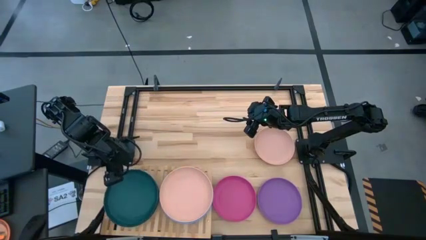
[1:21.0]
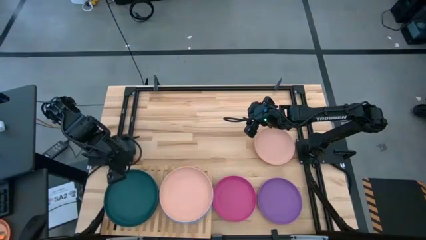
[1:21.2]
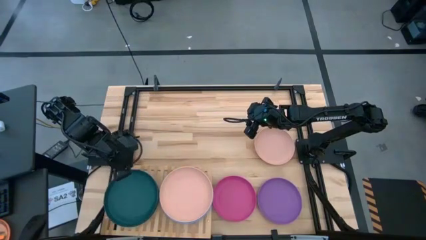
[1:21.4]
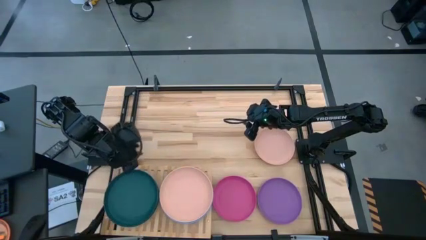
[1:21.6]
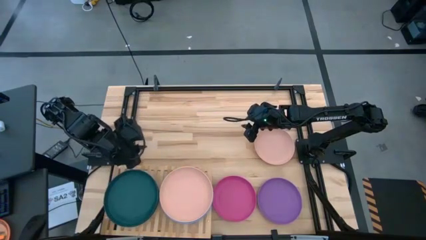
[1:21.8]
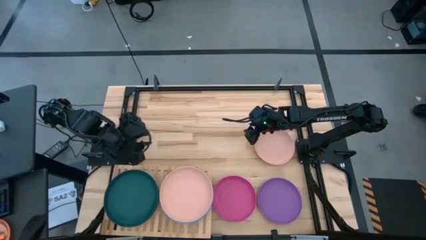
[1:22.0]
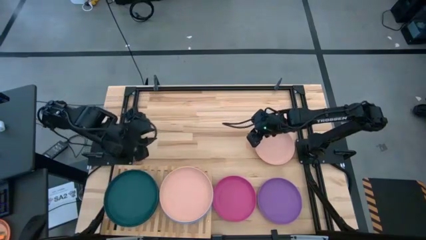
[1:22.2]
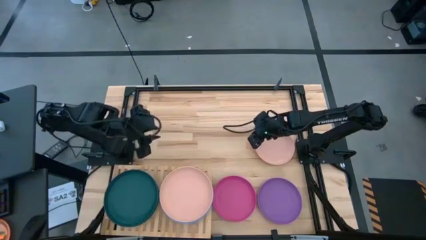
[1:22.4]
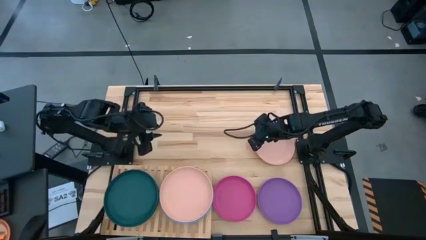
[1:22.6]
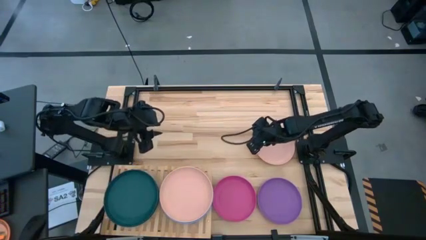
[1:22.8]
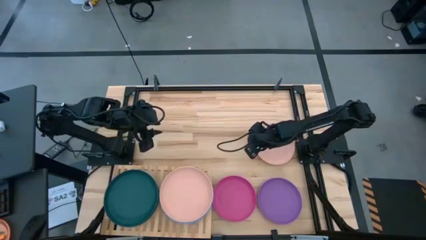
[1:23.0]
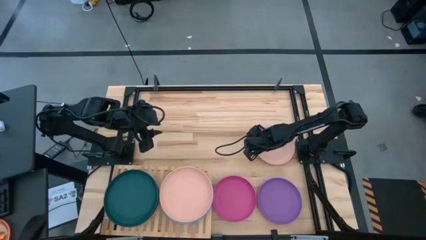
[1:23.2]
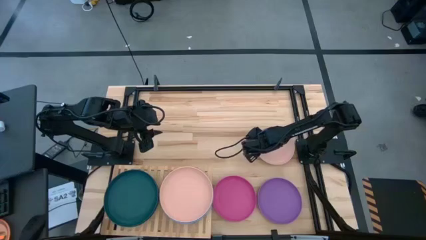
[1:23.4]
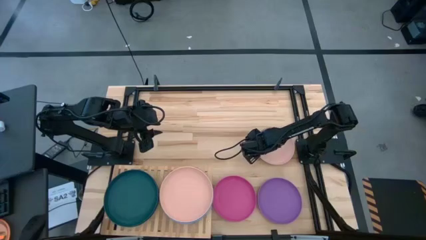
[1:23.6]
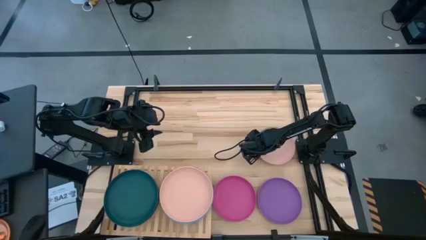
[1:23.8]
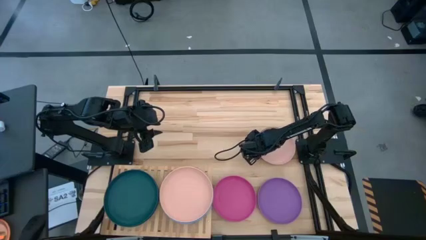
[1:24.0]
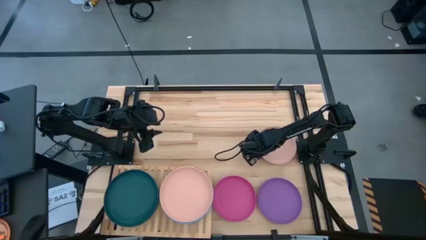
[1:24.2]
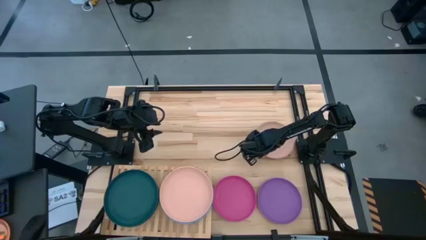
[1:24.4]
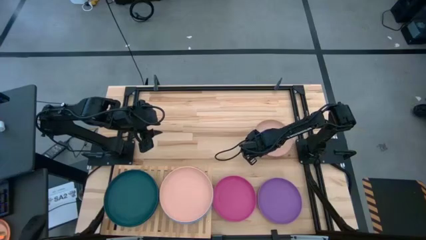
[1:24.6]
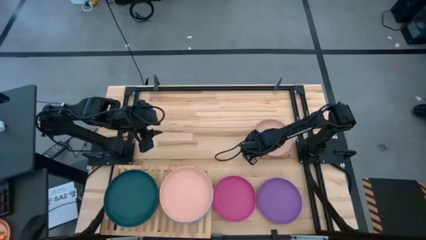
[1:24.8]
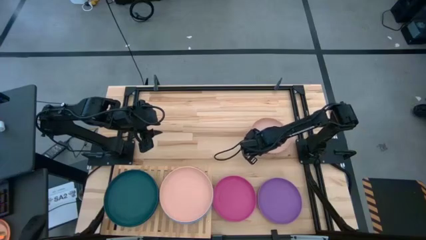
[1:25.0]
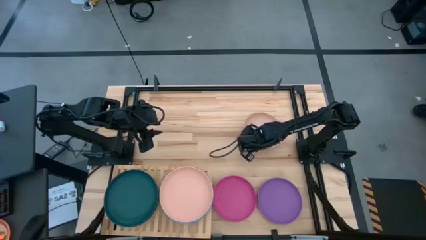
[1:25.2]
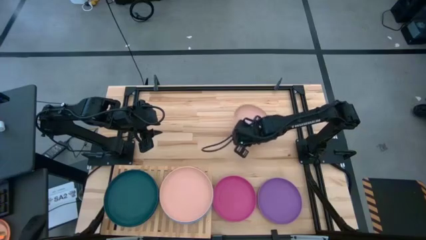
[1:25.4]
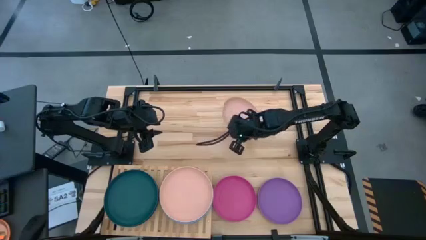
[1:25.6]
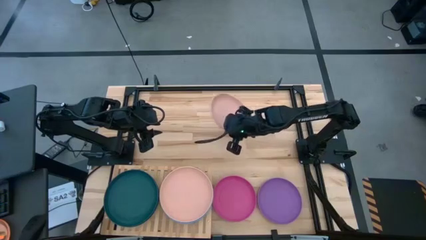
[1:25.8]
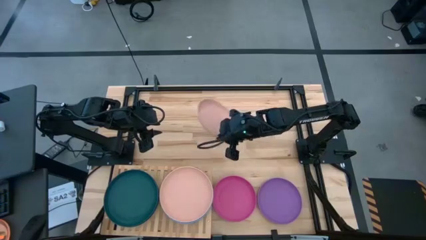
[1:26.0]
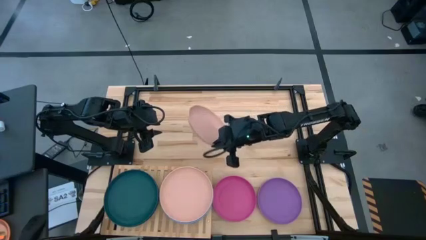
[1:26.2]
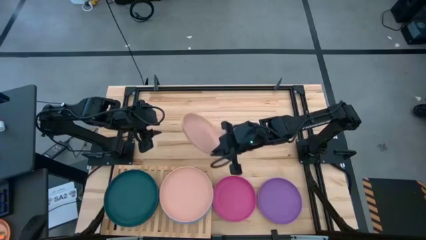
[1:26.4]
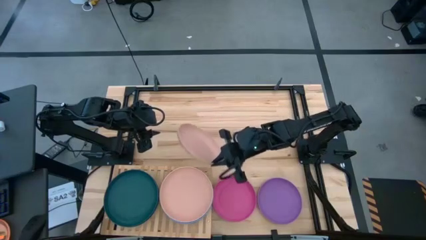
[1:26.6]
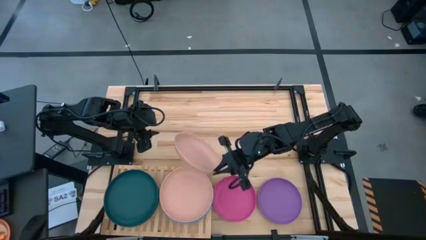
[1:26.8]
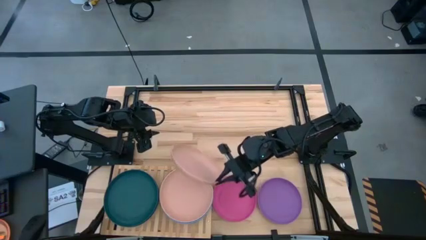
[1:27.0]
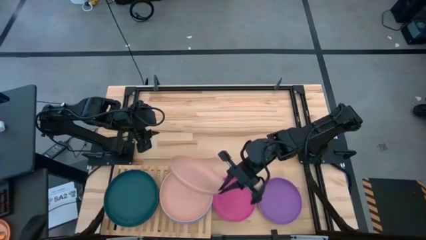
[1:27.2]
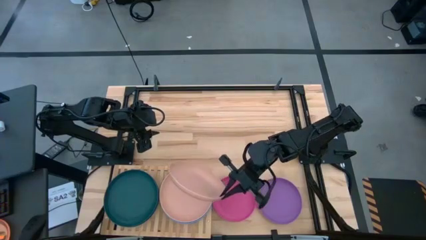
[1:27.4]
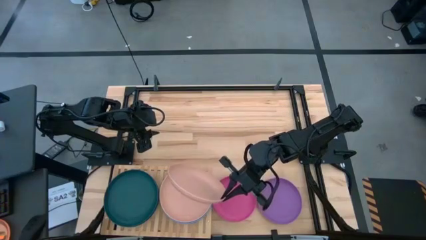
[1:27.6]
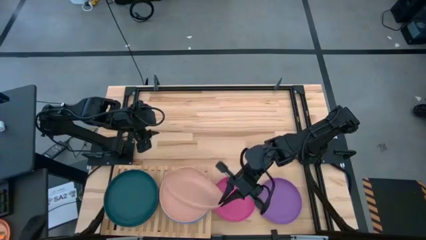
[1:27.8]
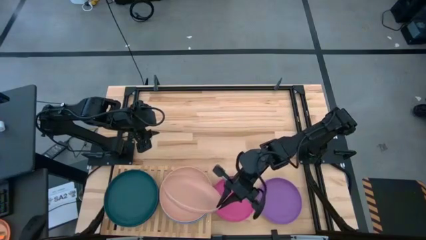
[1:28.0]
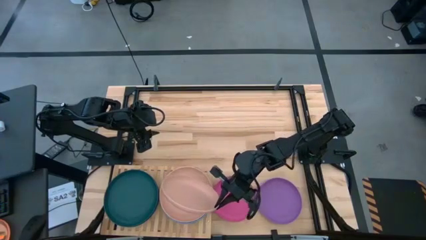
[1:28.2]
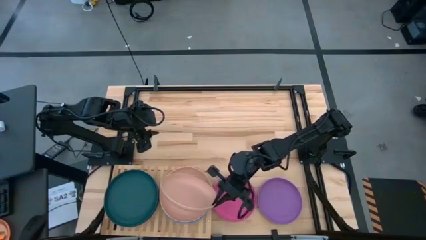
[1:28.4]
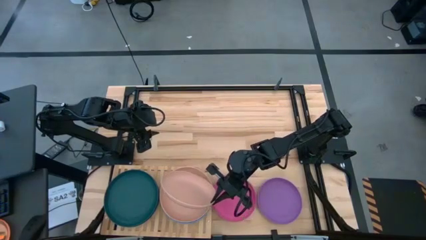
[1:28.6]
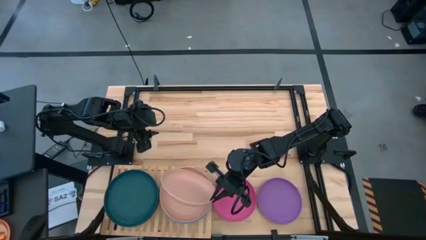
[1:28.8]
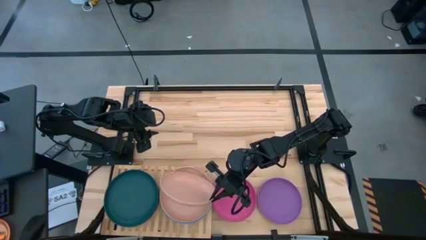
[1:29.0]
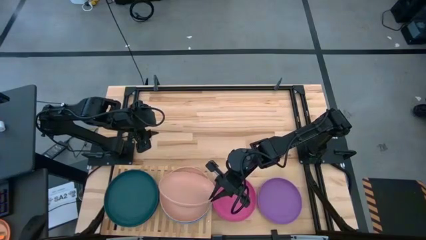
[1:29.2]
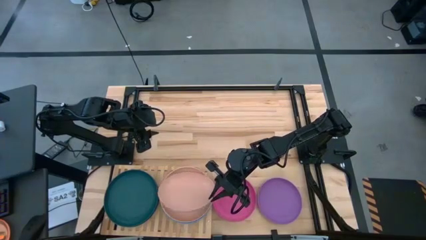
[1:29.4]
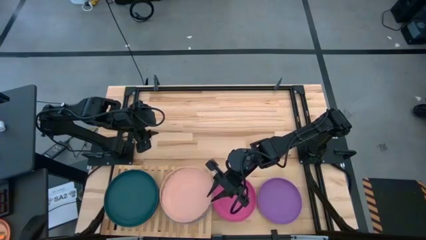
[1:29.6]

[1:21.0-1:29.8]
Task: Place and stack plates onto a shelf
Stack the light orange plate on top of the light orange plate on the shelf

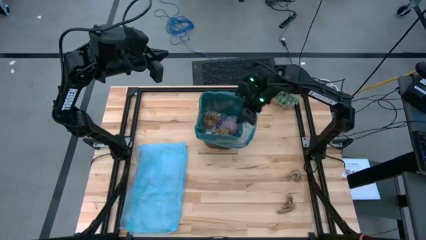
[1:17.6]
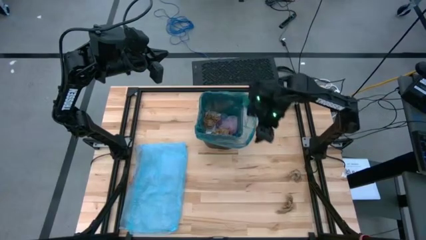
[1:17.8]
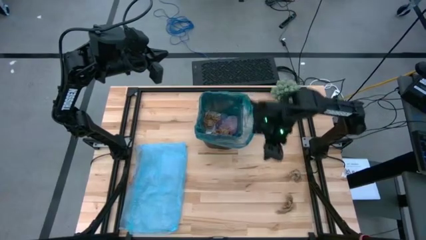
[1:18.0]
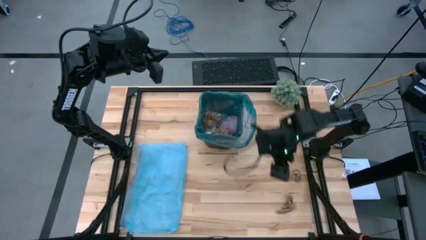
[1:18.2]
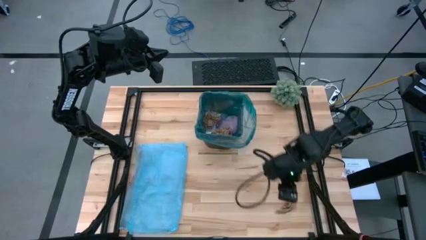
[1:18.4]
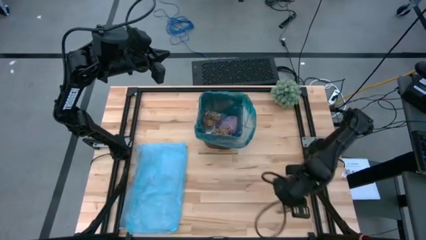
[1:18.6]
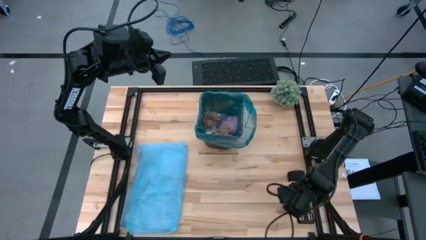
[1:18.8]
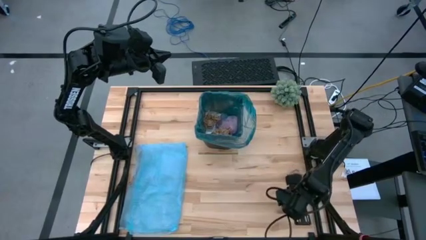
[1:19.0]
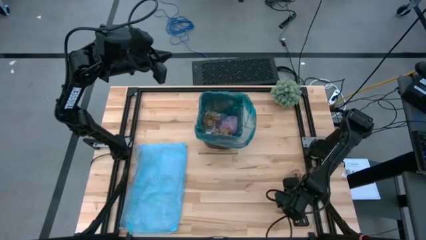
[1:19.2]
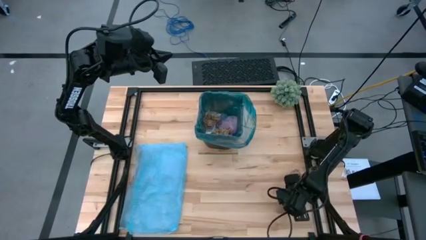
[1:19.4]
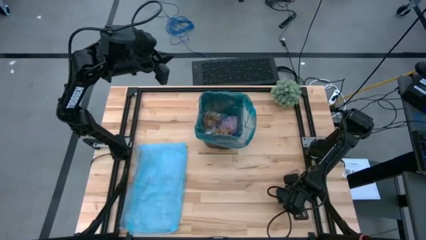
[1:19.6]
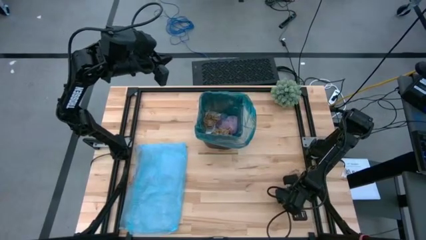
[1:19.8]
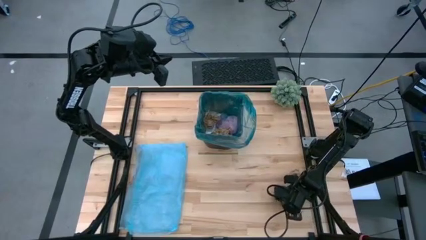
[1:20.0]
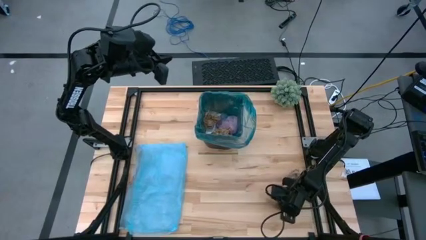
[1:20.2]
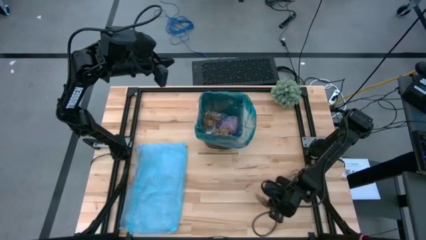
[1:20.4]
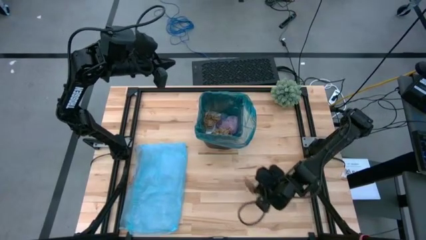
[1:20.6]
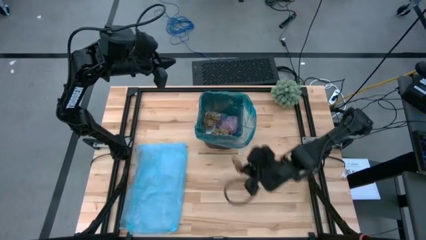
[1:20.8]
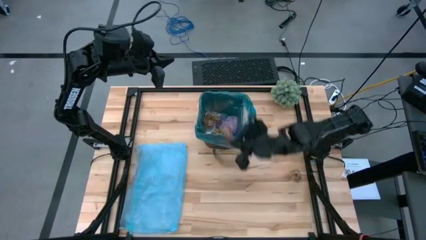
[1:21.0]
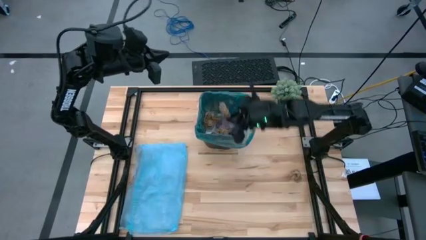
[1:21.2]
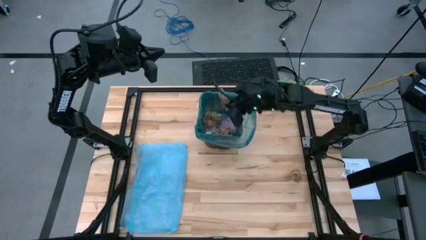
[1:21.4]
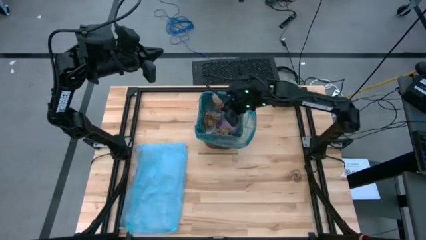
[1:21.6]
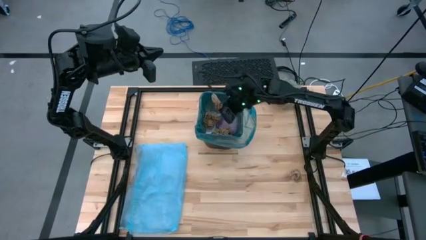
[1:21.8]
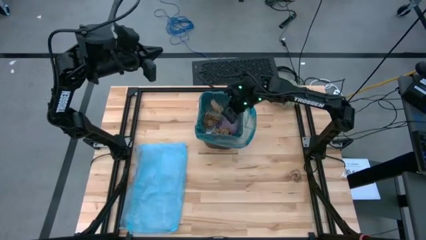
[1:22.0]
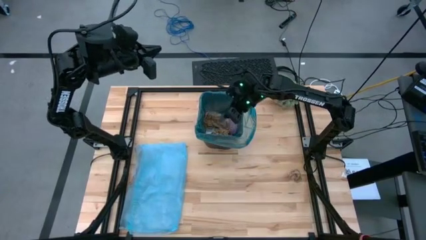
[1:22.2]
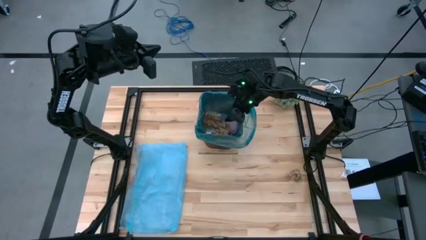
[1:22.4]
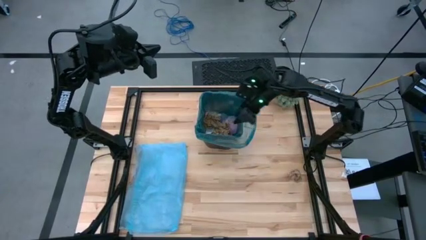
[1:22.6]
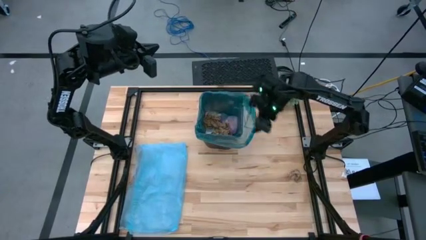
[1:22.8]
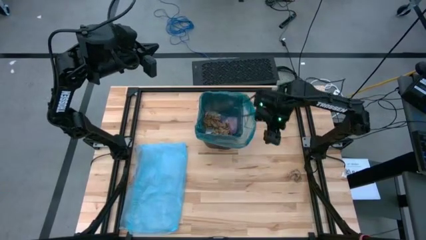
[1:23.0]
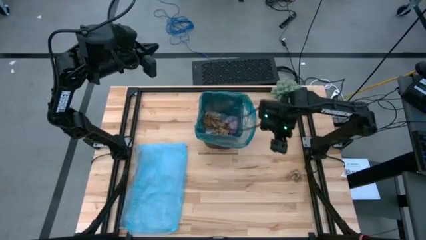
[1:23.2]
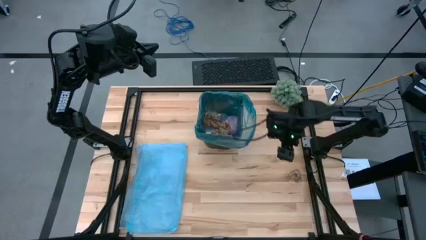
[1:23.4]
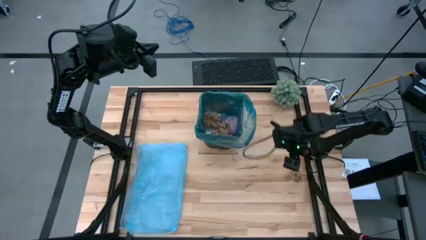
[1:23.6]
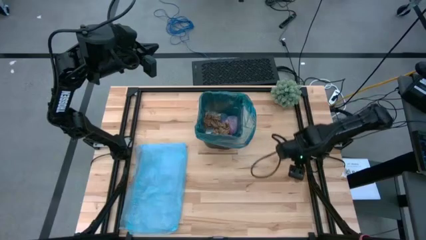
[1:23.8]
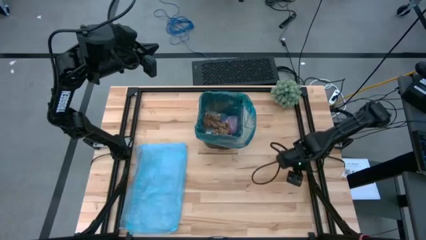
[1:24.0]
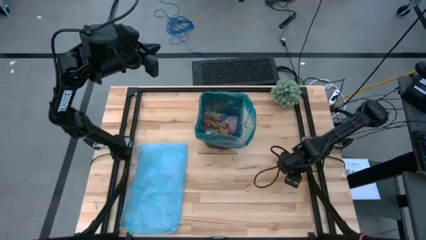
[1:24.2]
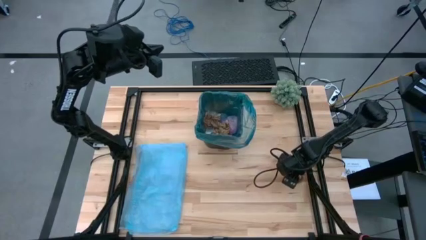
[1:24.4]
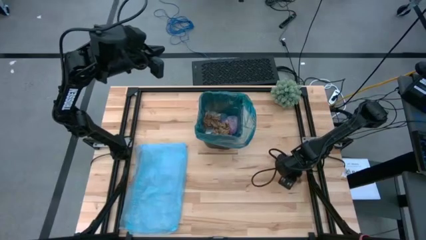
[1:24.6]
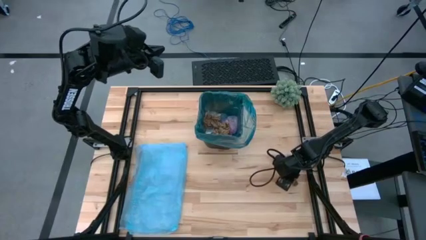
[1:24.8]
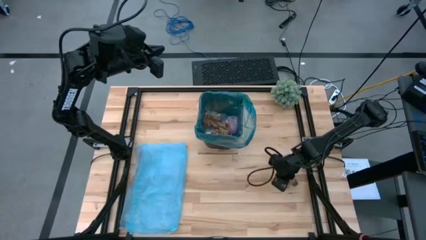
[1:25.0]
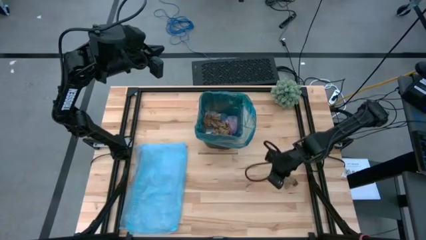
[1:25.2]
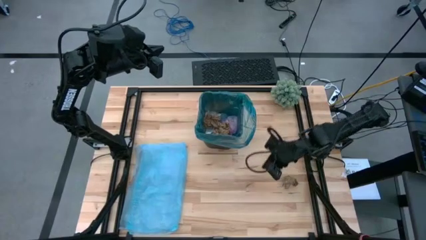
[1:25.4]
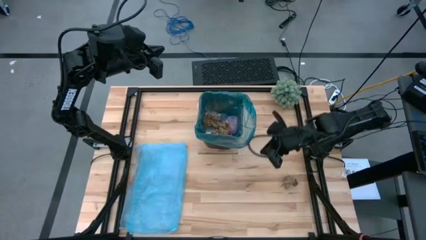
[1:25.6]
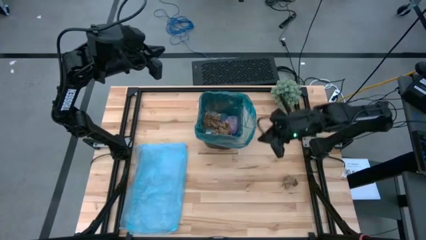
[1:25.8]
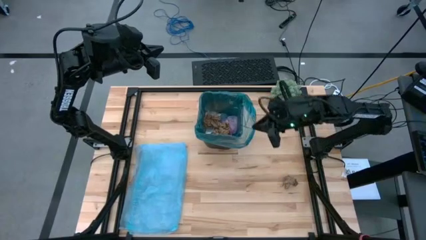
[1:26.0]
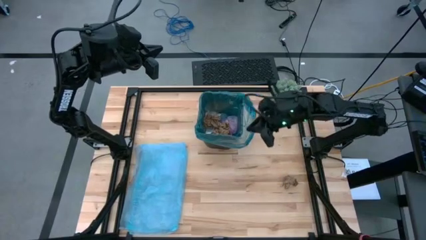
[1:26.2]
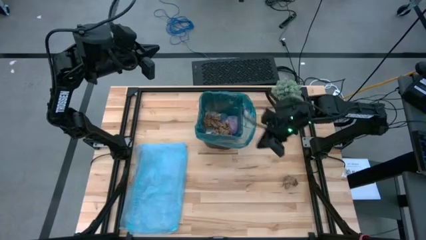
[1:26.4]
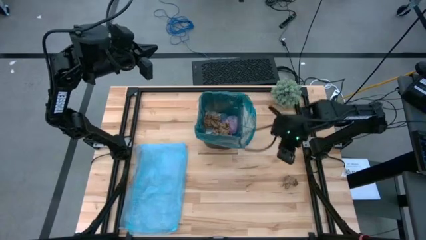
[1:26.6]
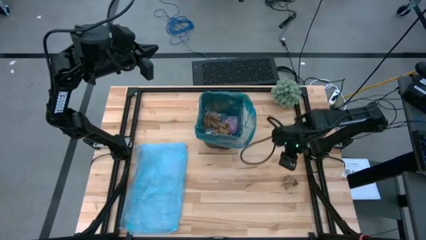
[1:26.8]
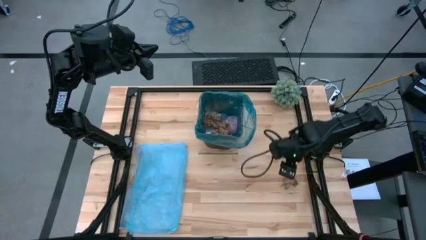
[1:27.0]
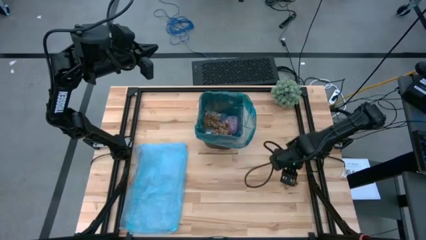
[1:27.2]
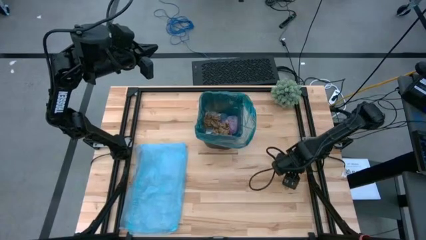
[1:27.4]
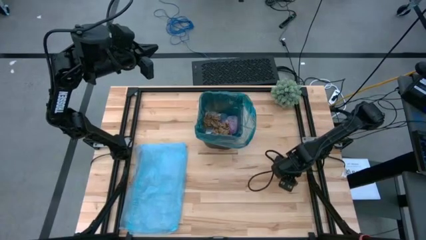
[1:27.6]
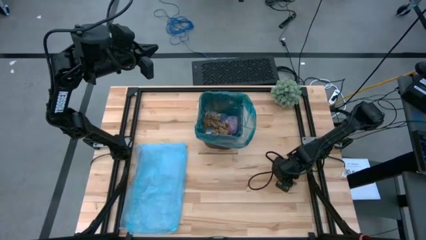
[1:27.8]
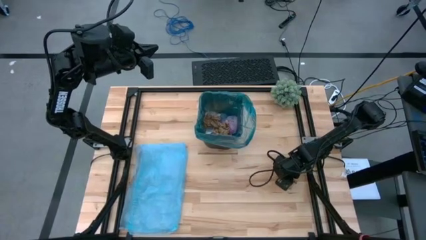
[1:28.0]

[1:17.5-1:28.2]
Task: place trash/remove bag and relplace
Put the brown napkin into the trash bin
